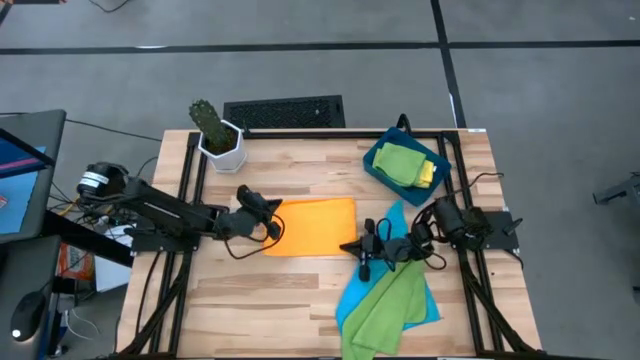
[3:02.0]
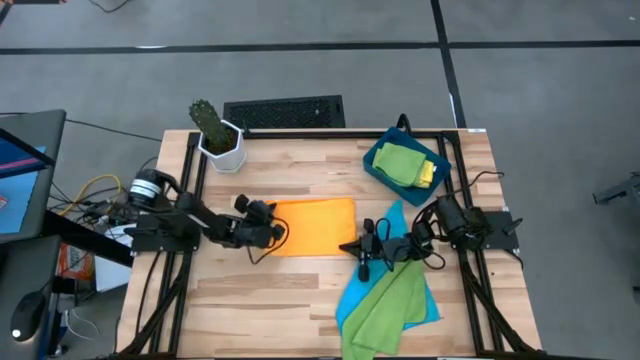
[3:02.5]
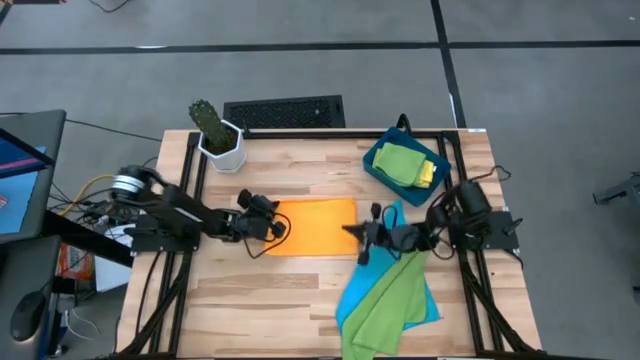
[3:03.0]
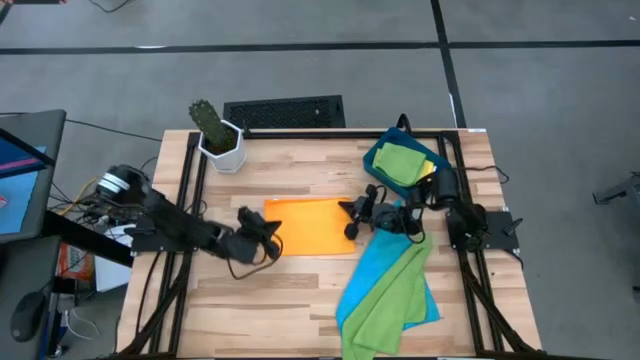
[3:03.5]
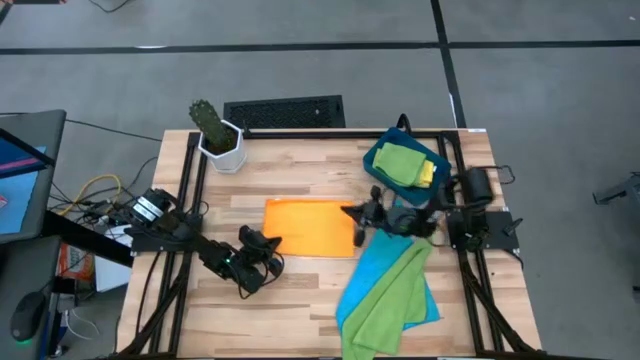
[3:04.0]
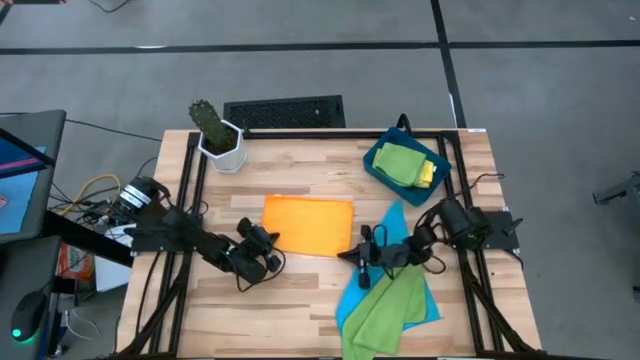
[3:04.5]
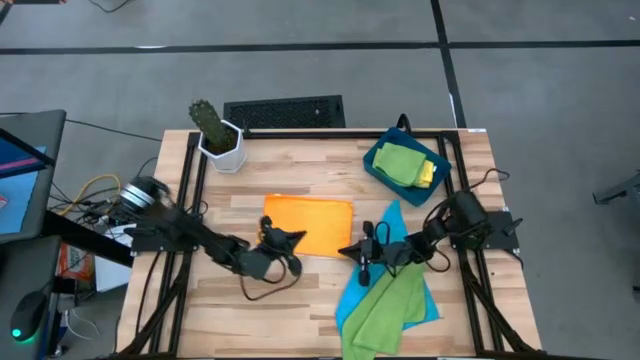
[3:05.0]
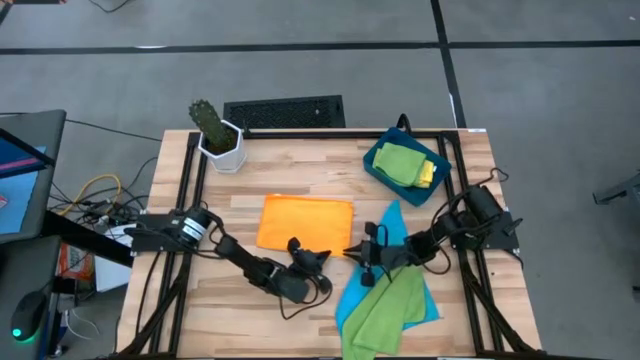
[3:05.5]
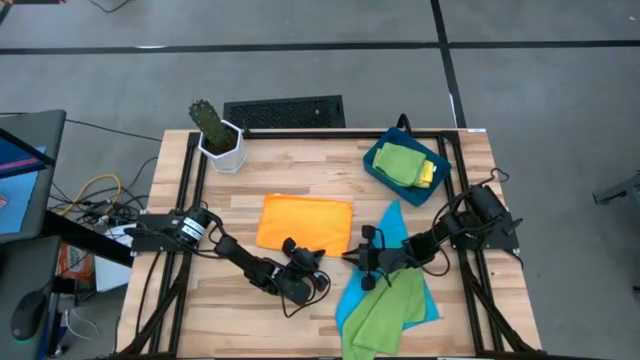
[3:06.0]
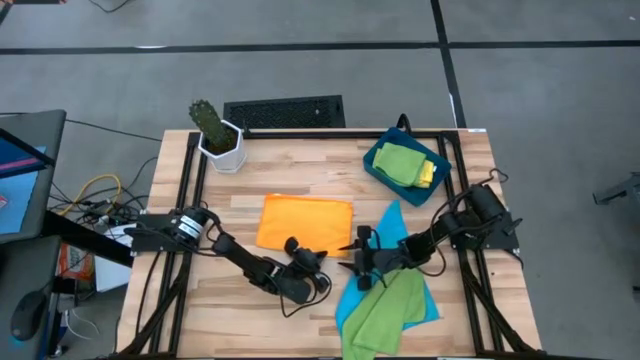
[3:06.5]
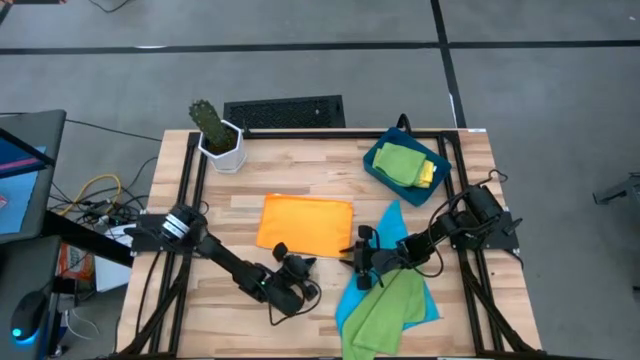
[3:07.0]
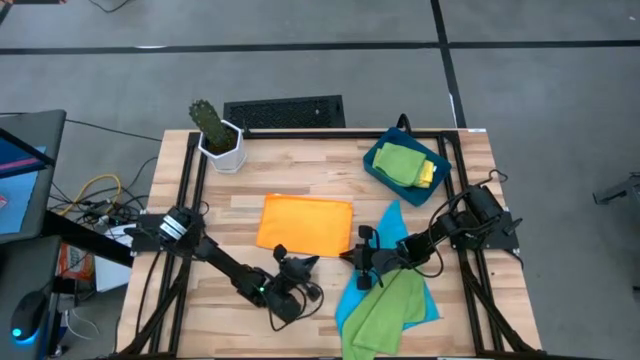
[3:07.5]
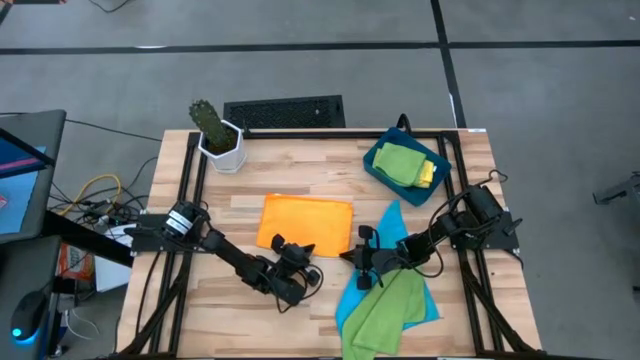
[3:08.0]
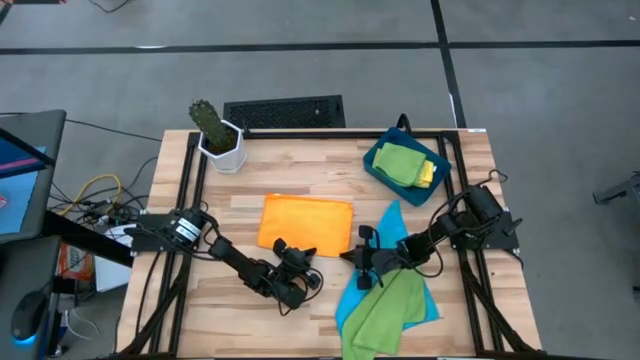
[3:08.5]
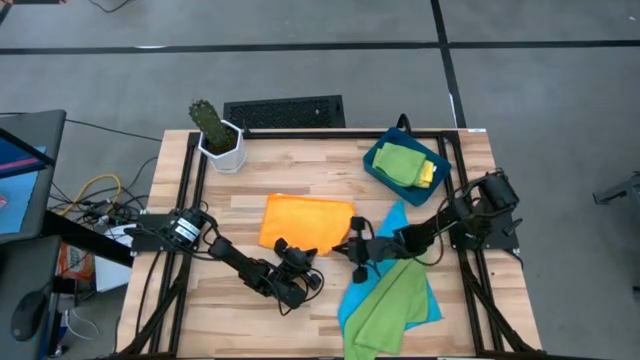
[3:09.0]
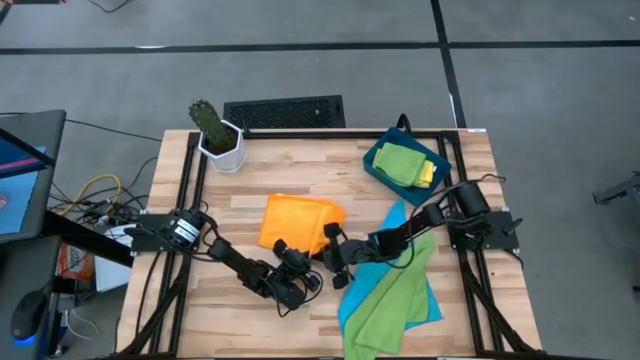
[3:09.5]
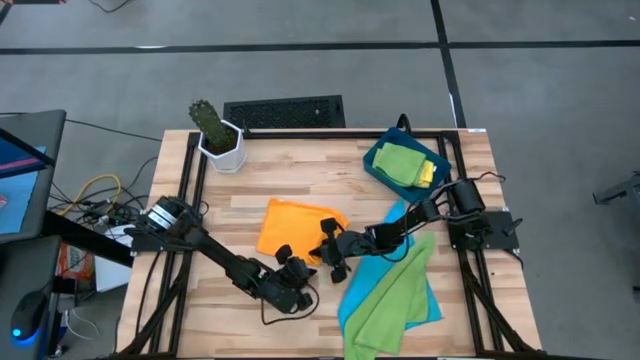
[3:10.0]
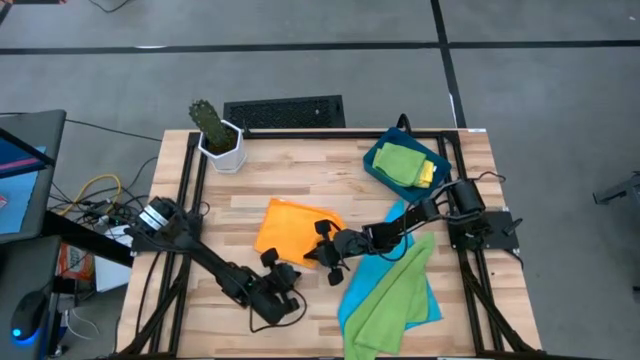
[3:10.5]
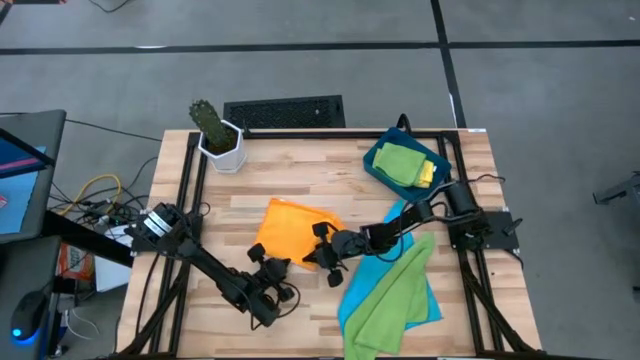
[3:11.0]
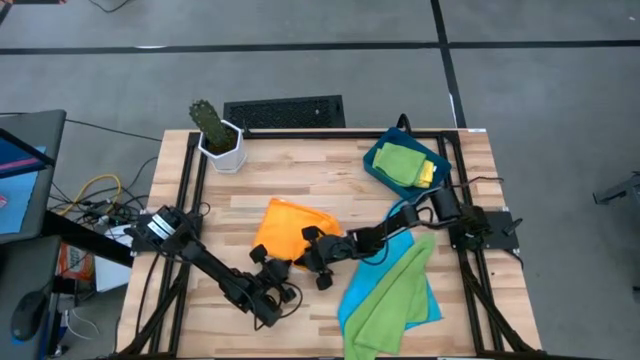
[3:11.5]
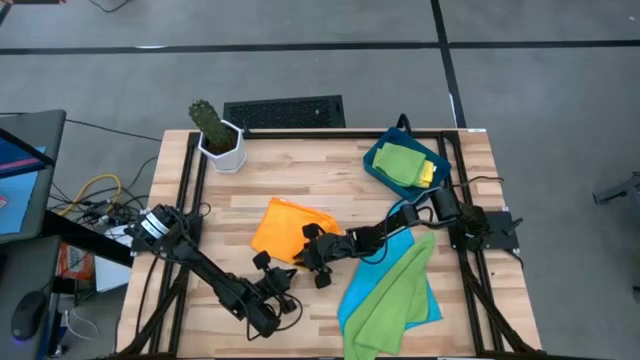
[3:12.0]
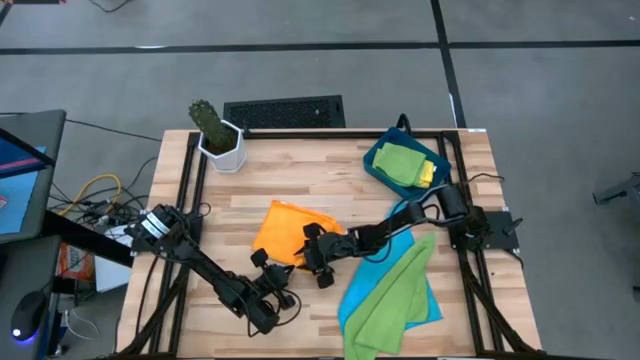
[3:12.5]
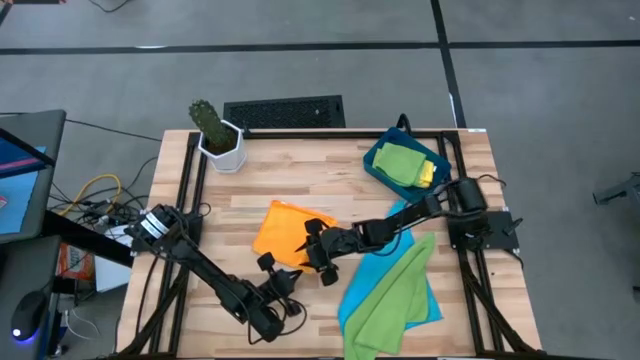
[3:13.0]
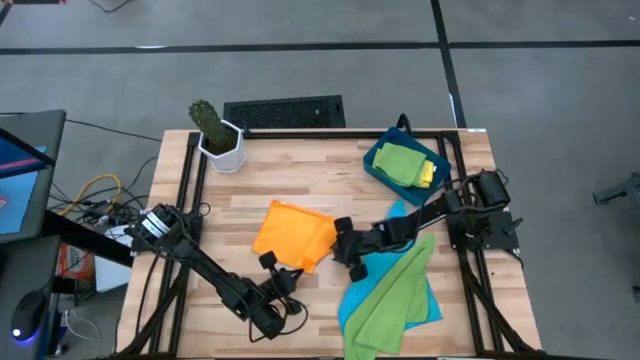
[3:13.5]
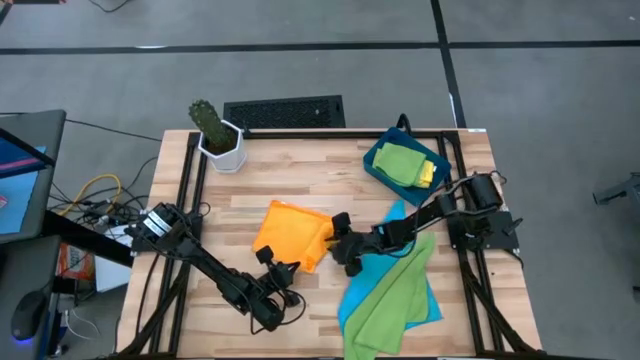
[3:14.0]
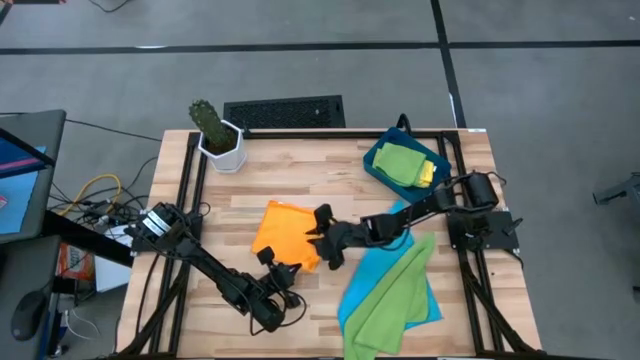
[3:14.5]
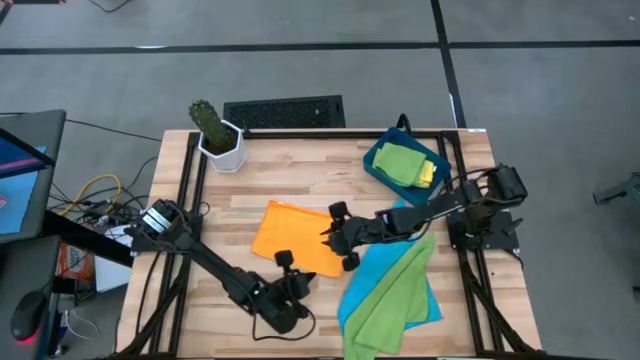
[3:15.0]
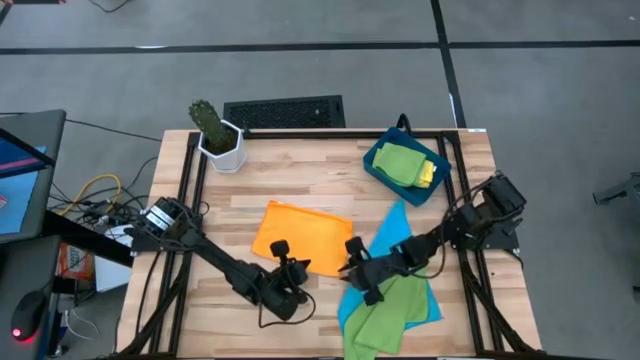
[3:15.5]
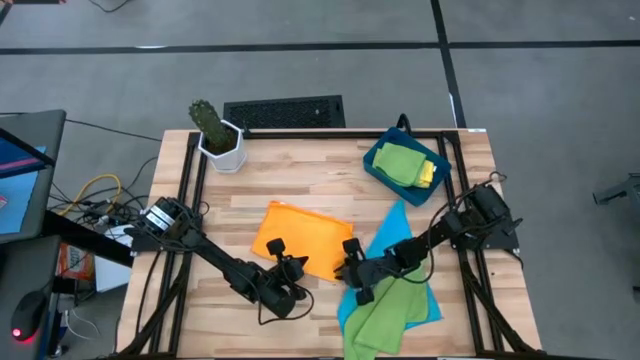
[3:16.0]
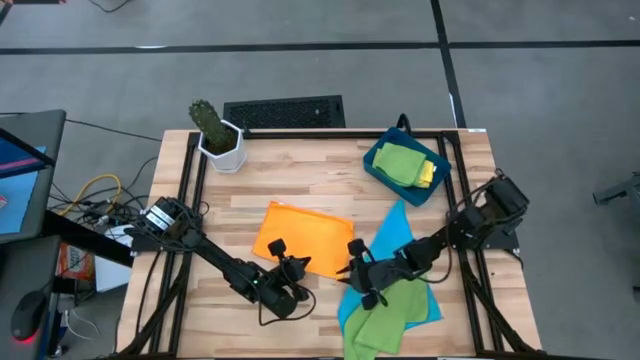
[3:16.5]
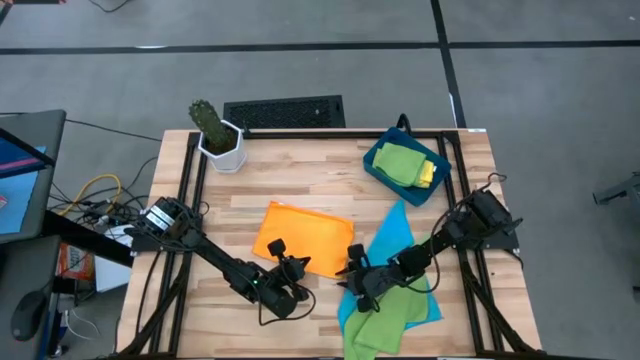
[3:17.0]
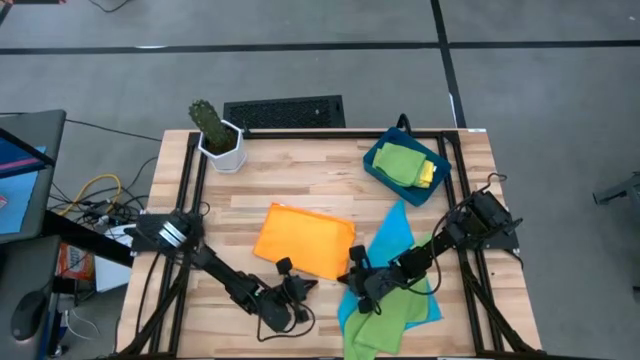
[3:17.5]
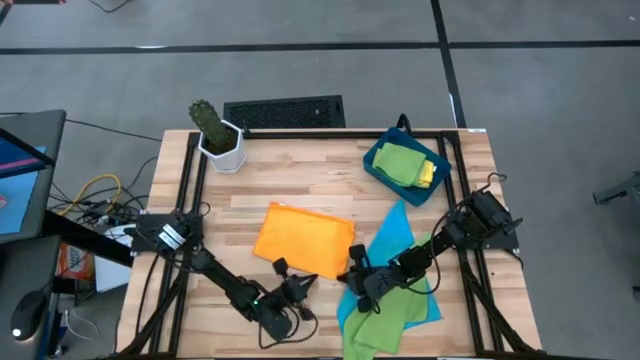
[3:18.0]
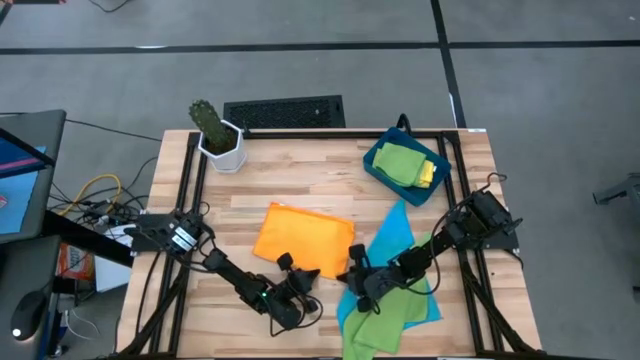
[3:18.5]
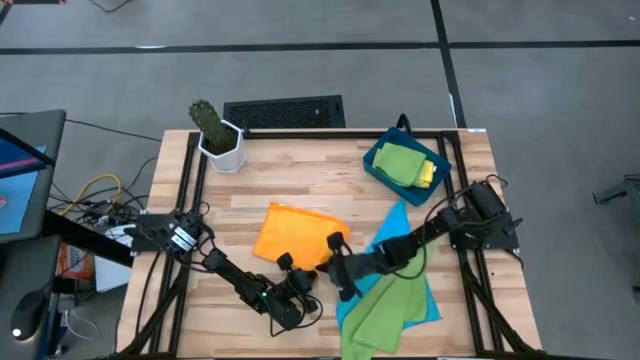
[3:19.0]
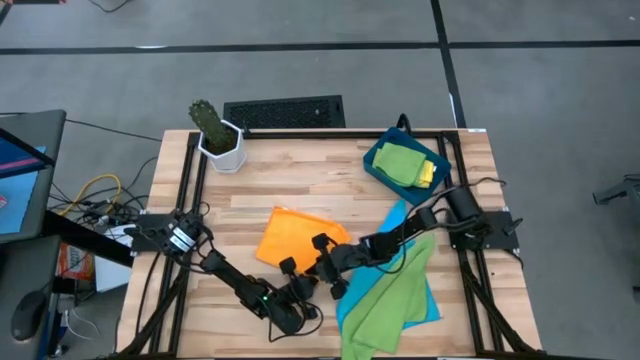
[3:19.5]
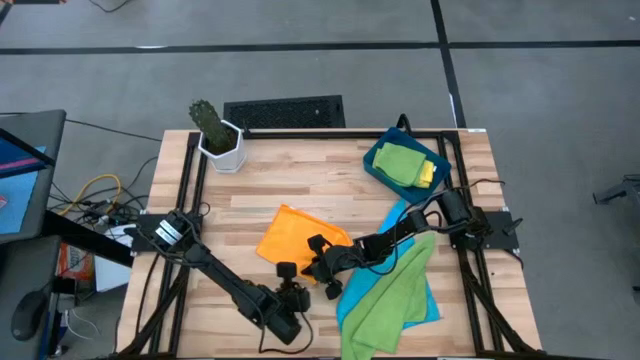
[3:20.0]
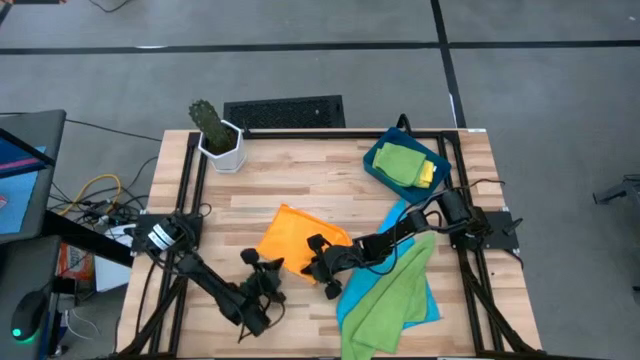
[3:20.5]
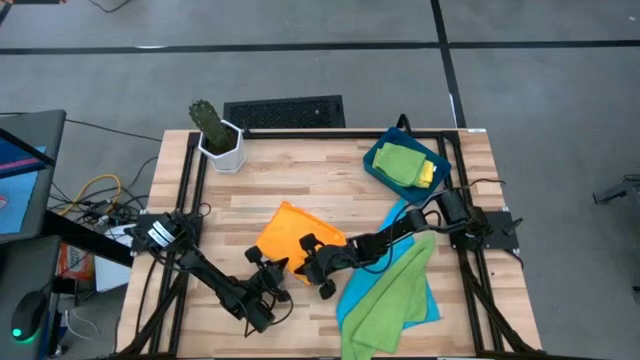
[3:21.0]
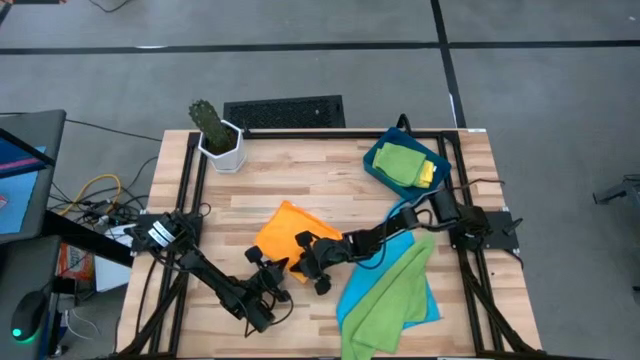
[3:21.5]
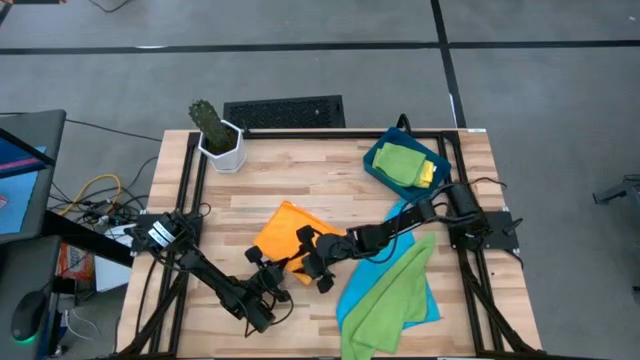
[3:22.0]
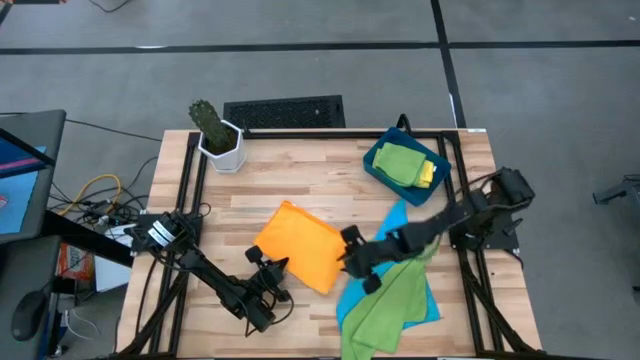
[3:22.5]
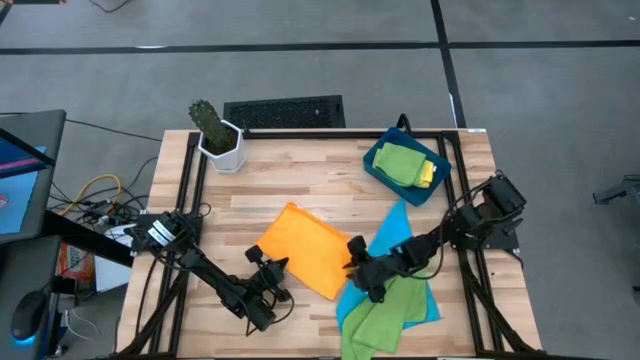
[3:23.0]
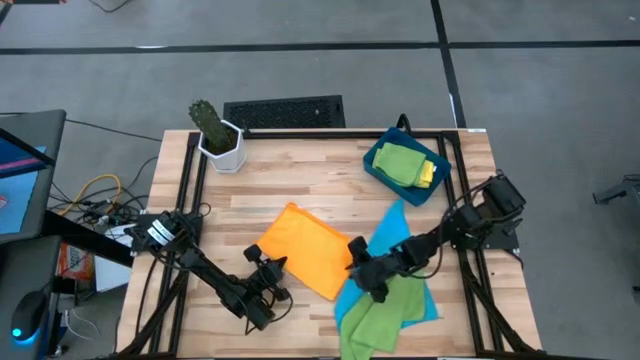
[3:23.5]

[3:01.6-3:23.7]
Task: Fold microfiber towels
Fold the orange microfiber cloth
